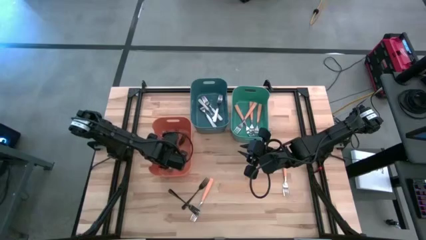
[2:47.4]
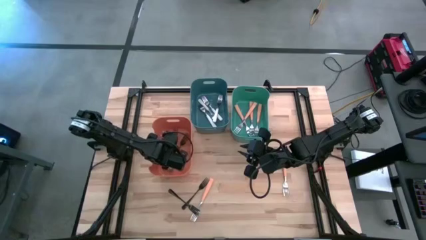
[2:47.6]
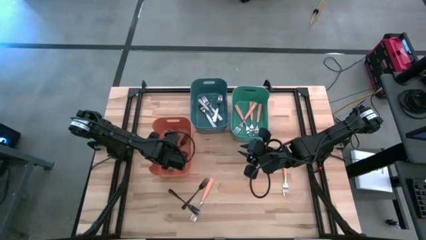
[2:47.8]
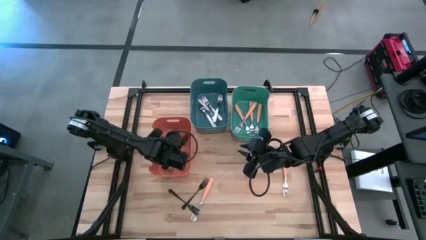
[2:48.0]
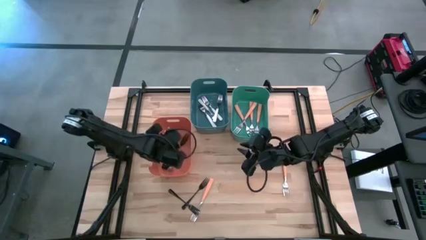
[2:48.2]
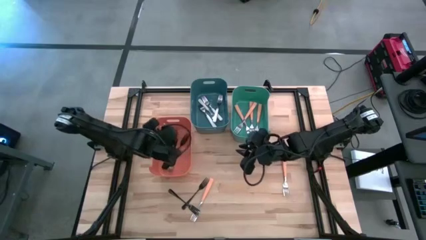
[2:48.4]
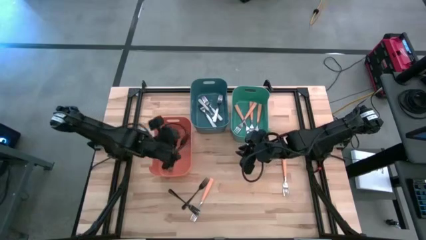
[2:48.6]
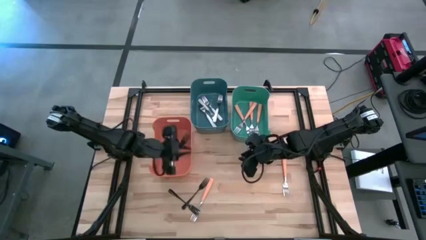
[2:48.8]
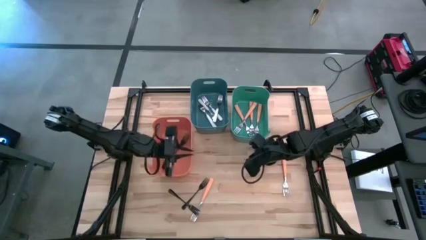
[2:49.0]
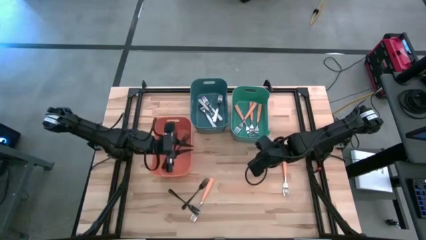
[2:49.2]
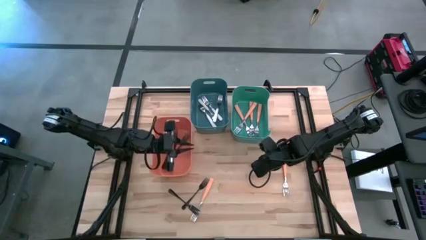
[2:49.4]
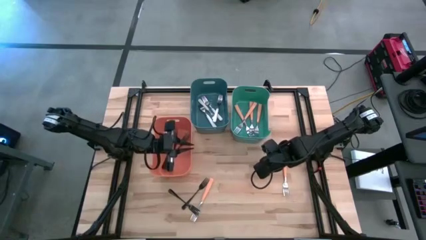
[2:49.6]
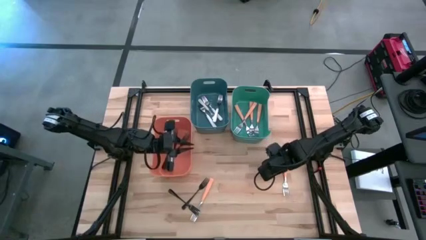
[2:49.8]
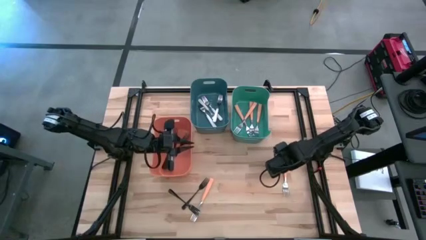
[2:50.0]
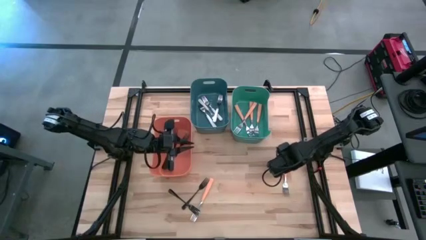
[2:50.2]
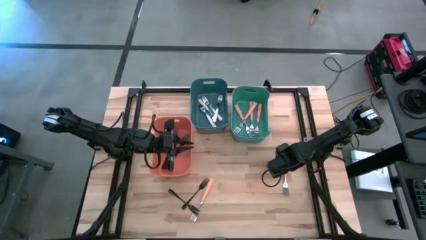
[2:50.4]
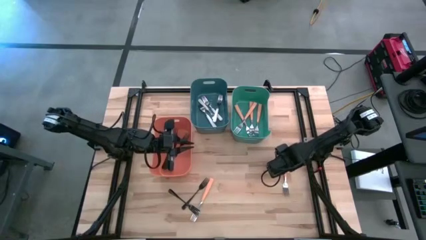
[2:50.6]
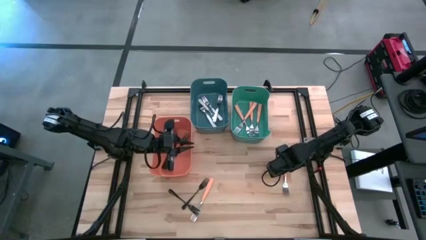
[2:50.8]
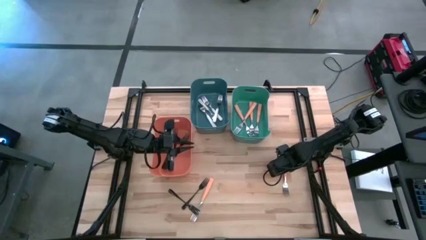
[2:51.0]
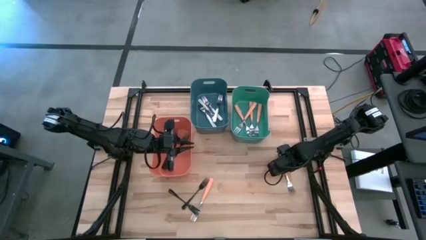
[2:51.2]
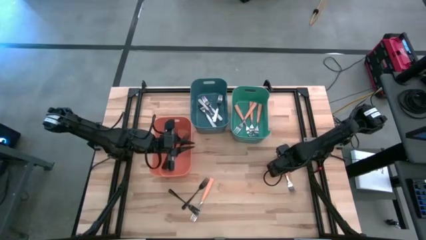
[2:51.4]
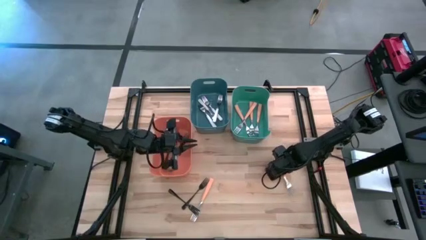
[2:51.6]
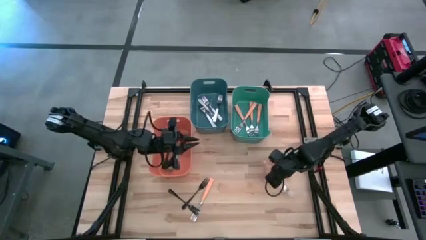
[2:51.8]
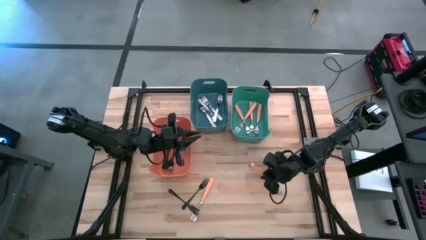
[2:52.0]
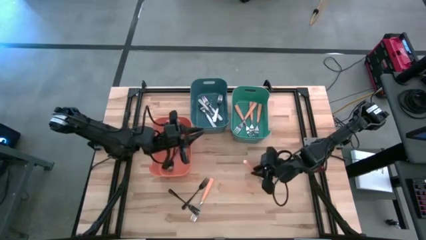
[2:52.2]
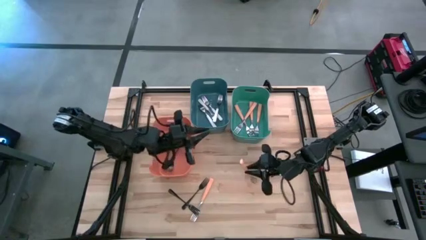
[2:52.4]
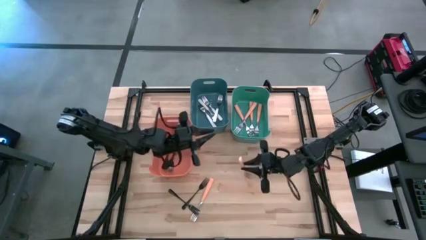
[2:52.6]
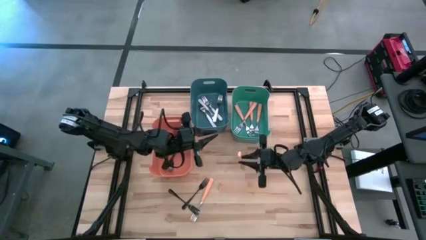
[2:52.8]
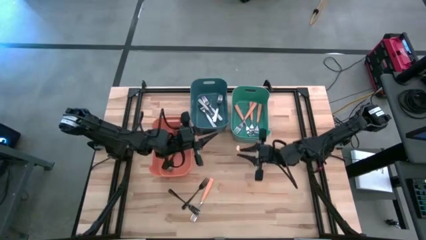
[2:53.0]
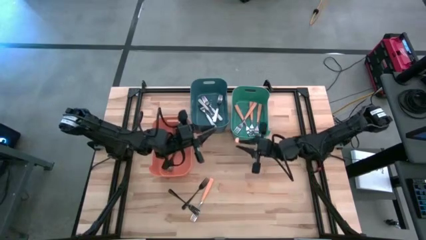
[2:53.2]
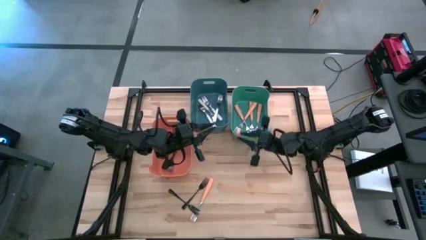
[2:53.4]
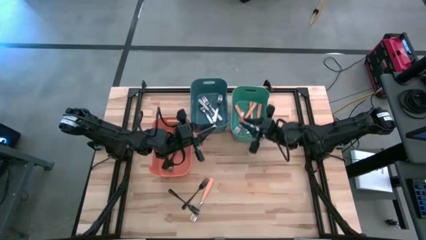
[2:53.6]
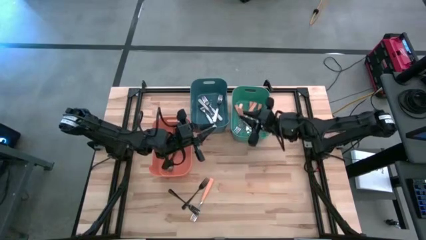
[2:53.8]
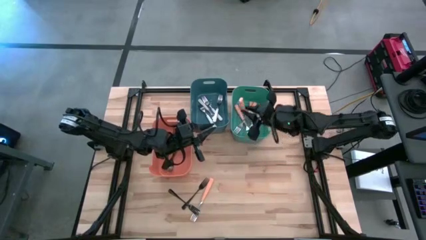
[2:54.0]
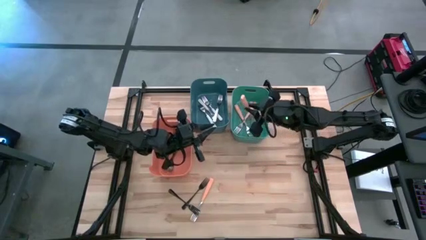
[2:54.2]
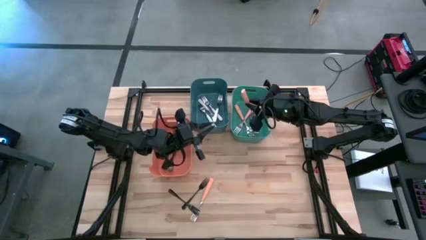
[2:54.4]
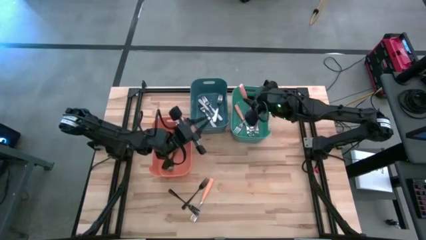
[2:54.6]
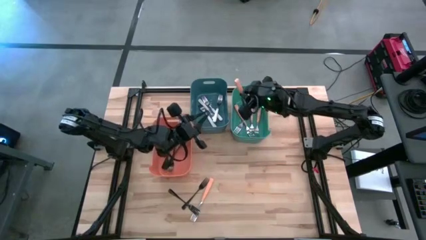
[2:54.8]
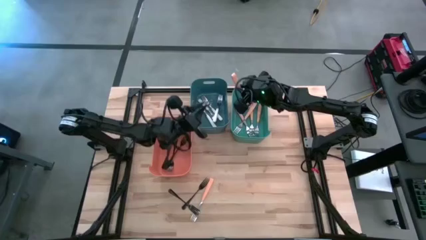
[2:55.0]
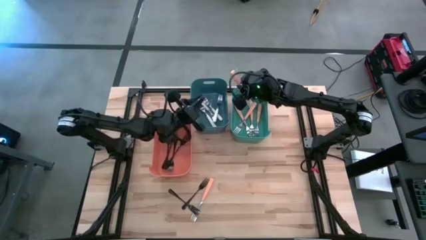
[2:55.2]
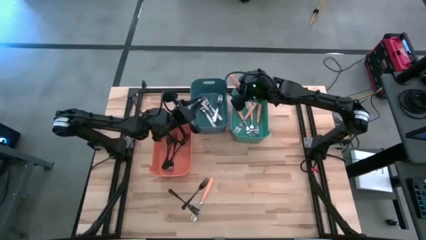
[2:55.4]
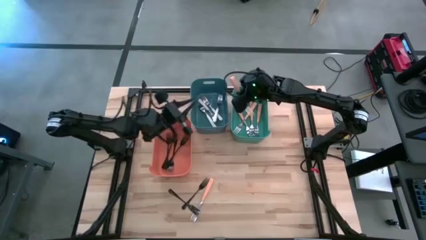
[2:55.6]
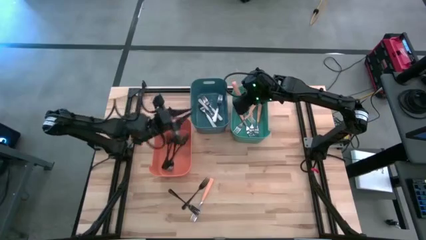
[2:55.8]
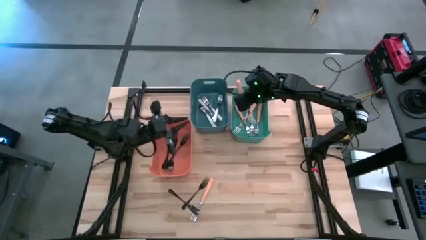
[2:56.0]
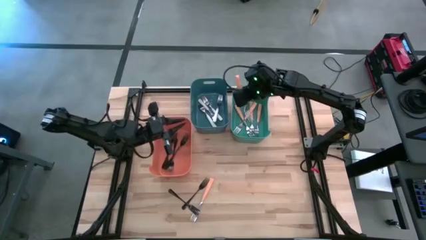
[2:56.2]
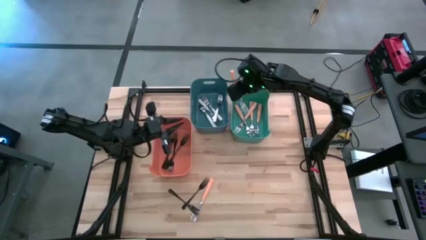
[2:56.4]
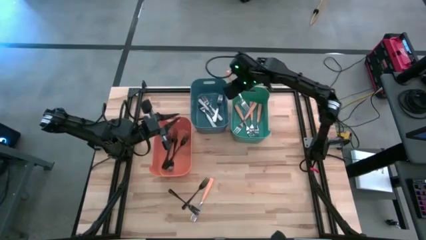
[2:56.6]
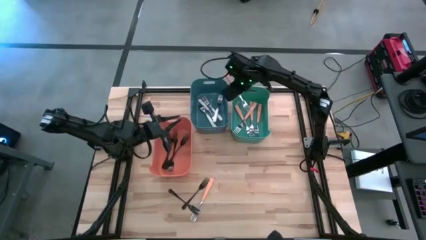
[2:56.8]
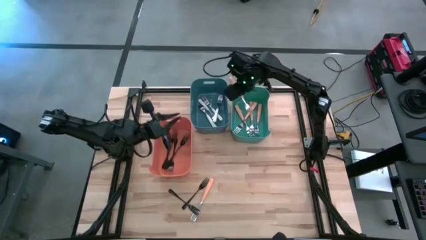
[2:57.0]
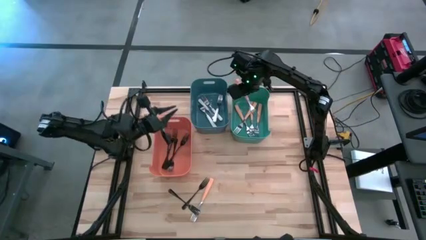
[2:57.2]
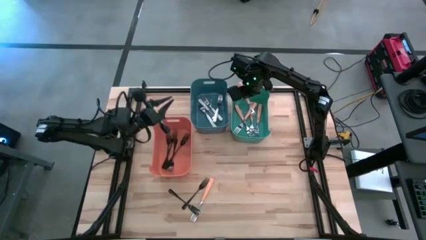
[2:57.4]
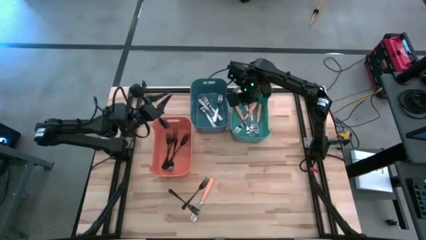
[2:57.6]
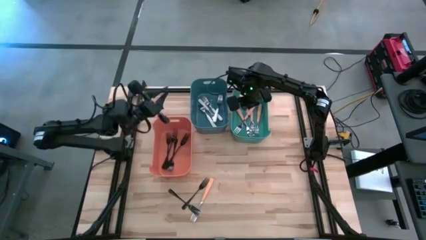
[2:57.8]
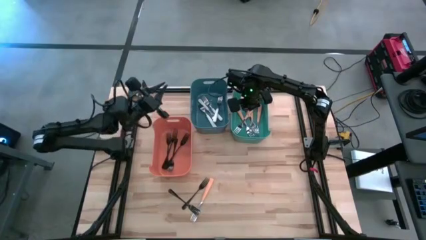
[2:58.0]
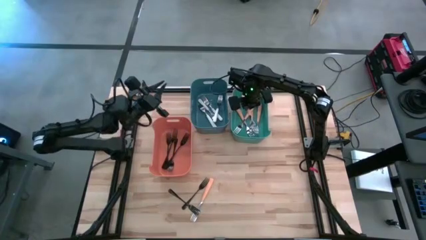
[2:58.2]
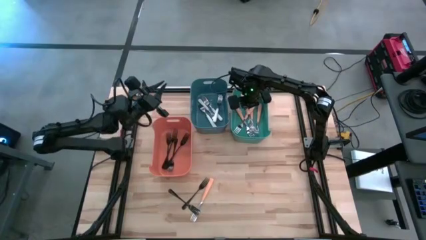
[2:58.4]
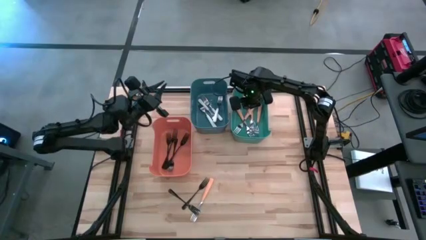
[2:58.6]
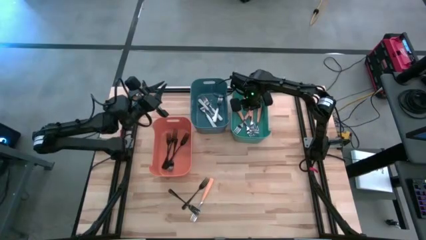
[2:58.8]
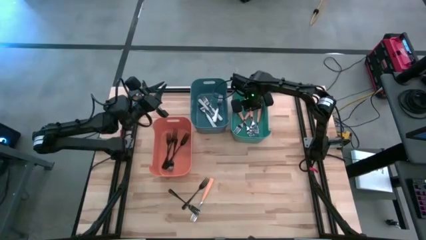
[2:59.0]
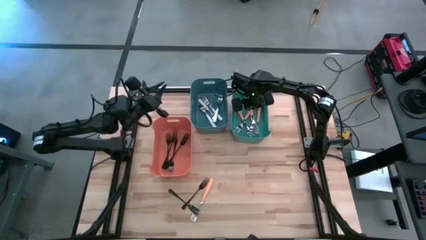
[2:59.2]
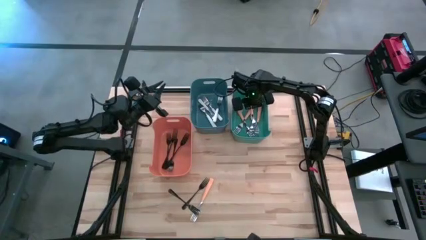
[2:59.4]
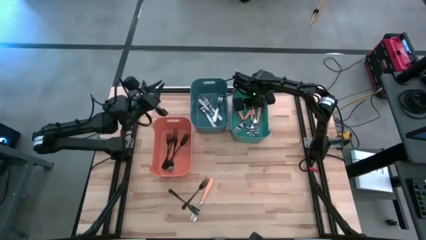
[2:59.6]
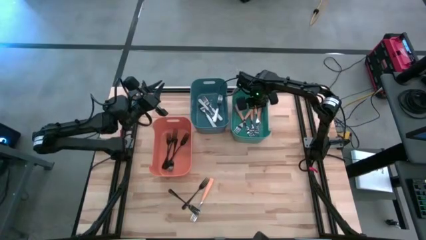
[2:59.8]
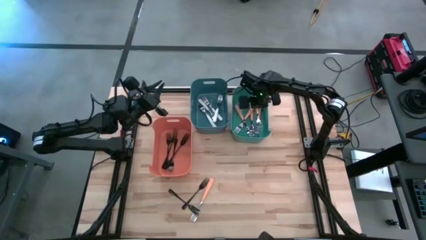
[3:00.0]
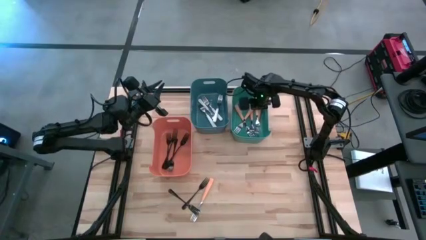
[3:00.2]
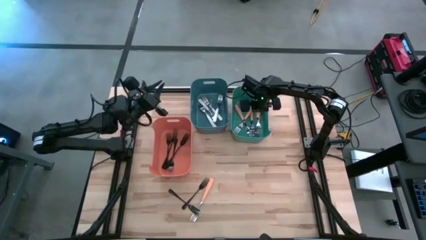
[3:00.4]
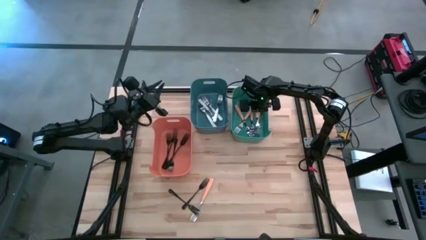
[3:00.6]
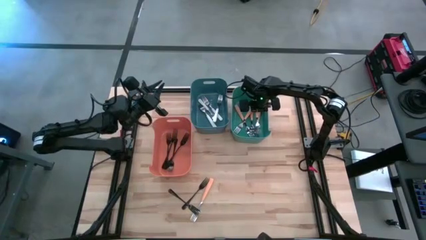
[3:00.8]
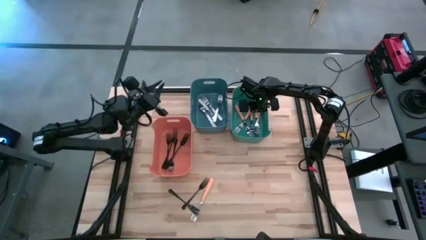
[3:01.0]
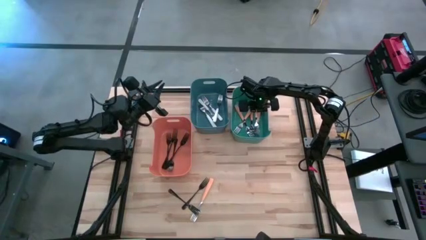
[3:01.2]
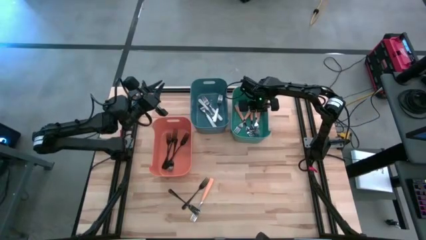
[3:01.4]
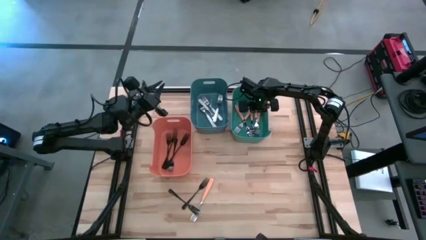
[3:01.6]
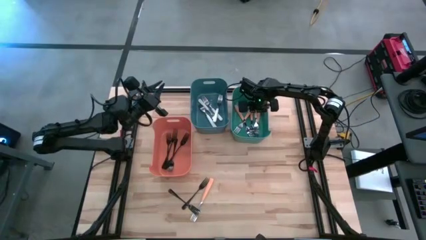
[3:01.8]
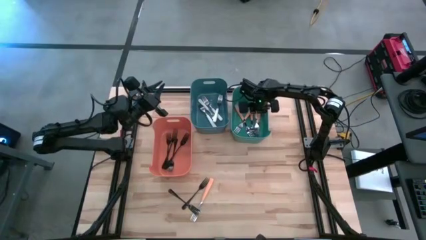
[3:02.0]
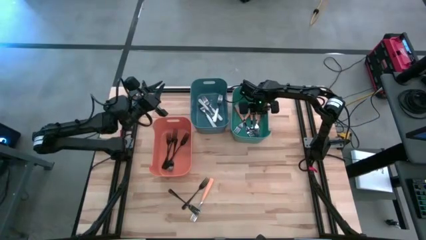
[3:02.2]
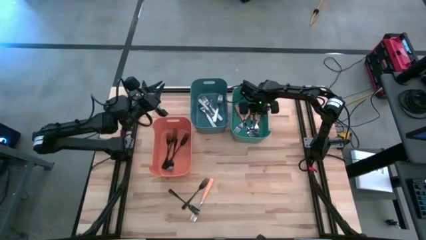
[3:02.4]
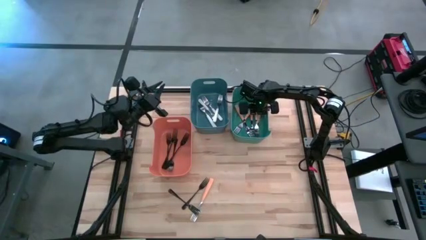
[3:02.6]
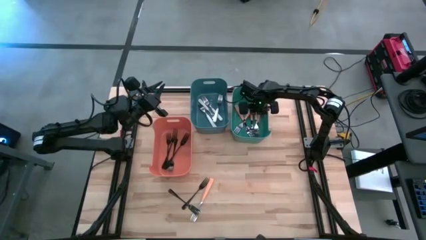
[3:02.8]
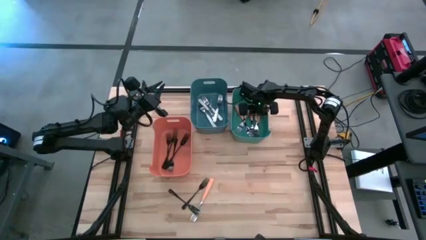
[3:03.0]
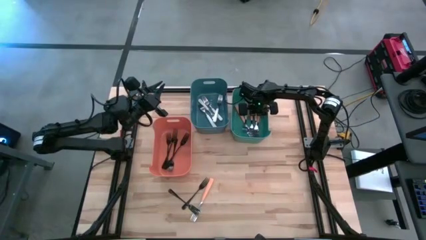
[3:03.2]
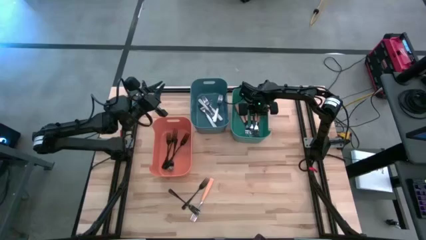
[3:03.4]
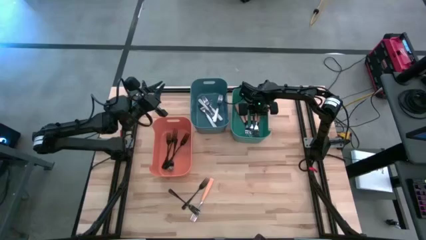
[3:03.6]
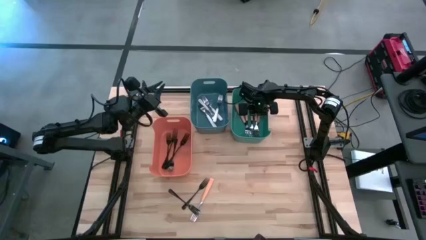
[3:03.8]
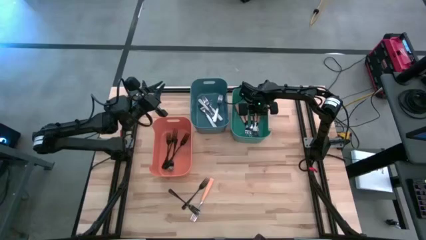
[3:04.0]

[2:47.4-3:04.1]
Task: Sort silverware by color (type)
Put the orange fork into the green bin
